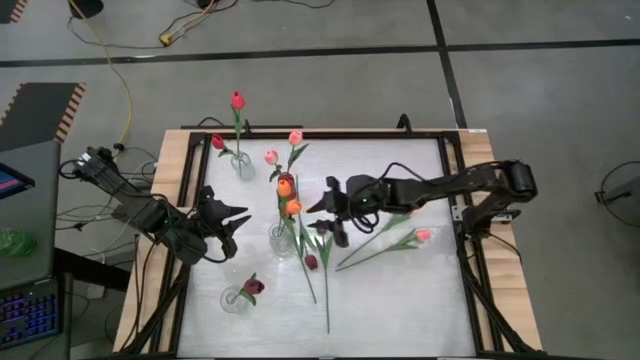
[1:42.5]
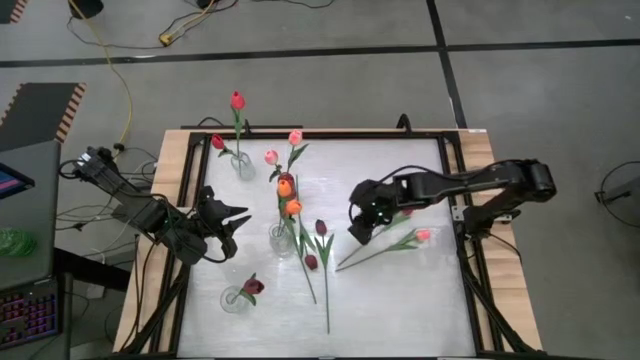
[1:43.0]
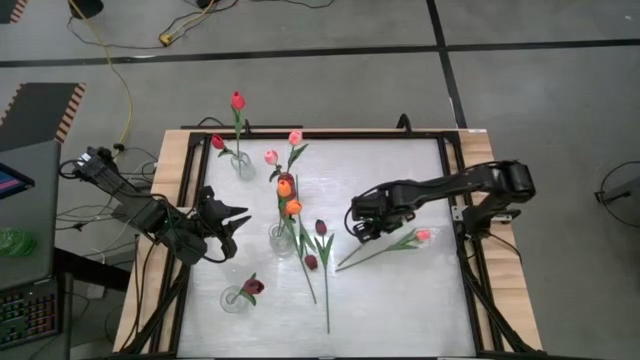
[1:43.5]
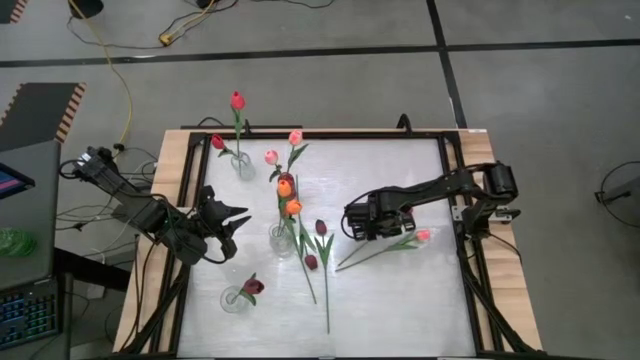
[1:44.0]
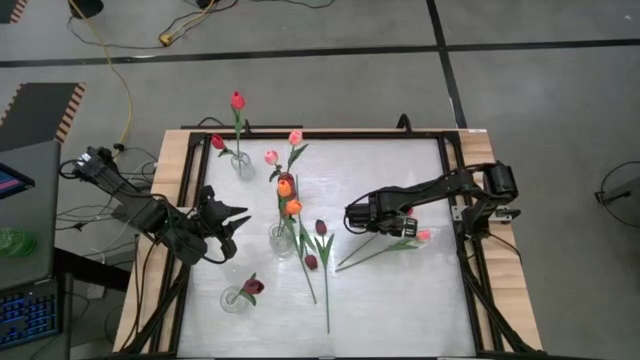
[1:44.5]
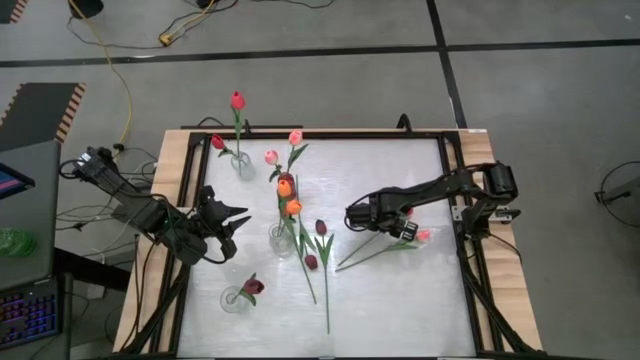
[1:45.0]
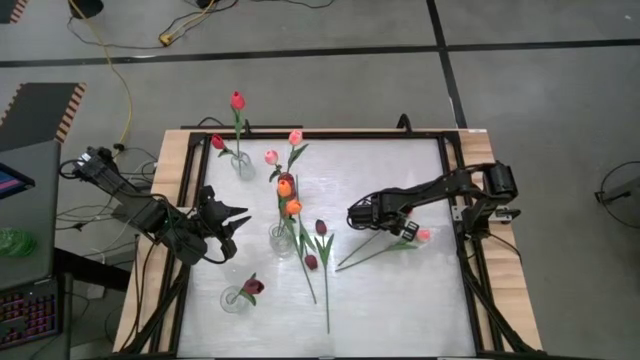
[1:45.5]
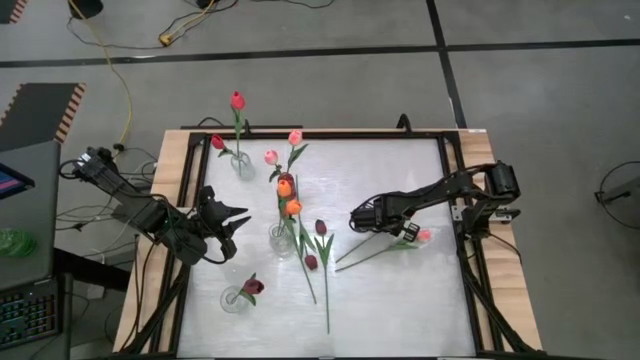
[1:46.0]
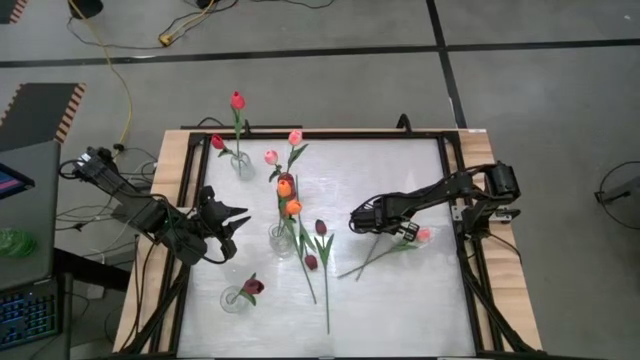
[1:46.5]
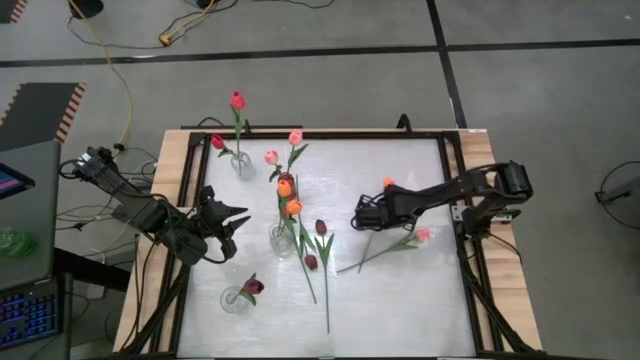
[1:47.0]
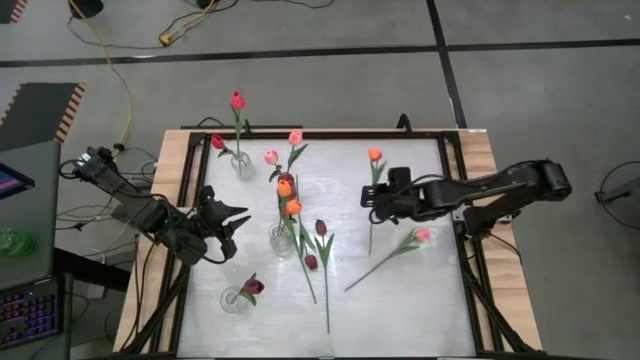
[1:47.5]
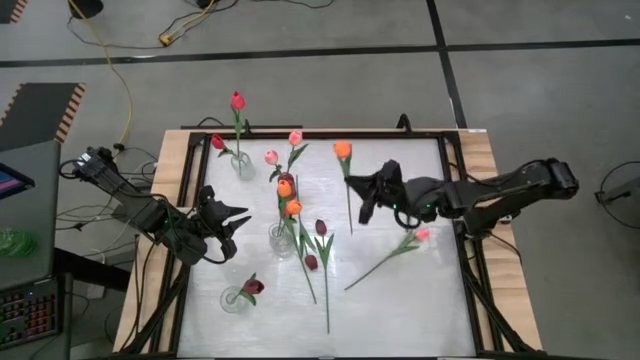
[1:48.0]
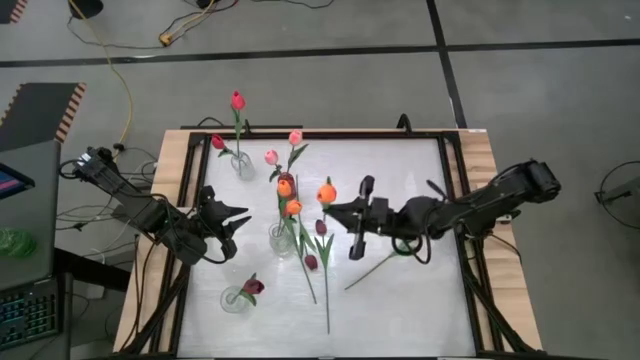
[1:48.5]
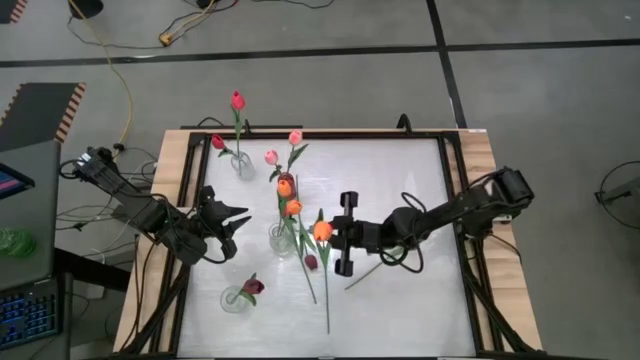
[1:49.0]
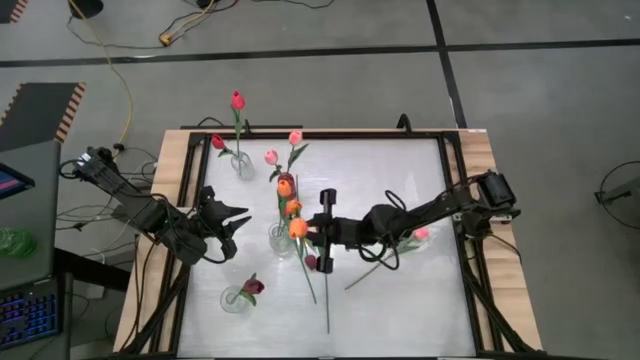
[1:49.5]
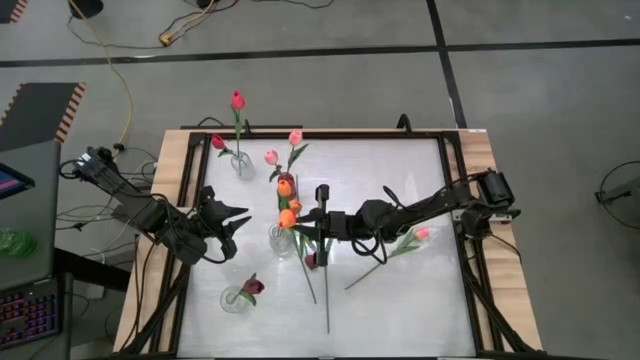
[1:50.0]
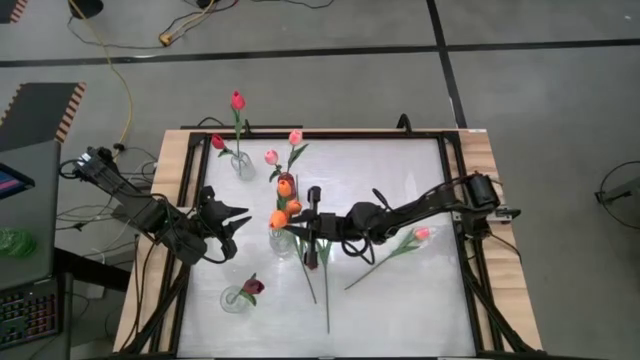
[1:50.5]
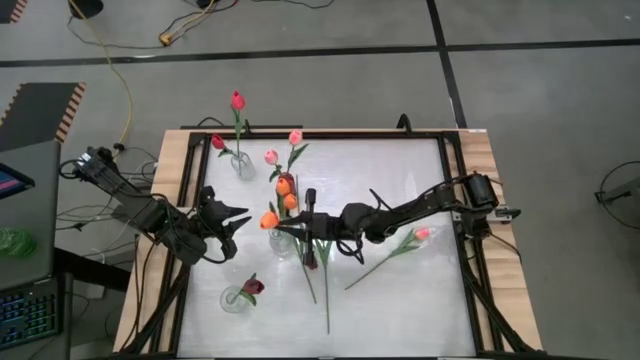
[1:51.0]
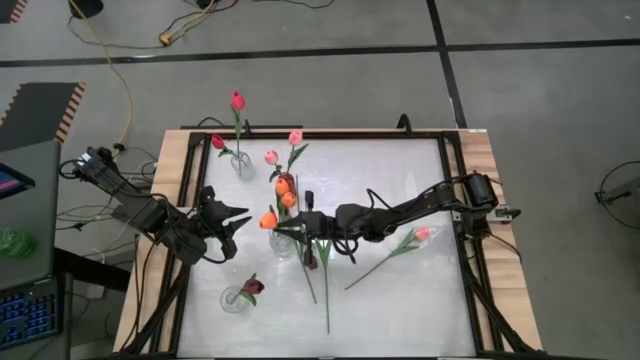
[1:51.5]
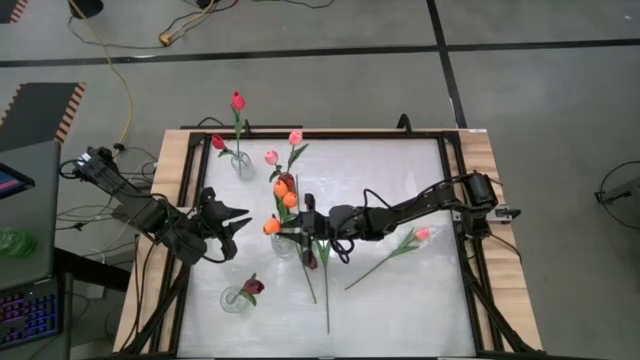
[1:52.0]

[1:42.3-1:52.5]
Task: Sort flowers into vase by color
Put the orange tulip into the middle transparent vase

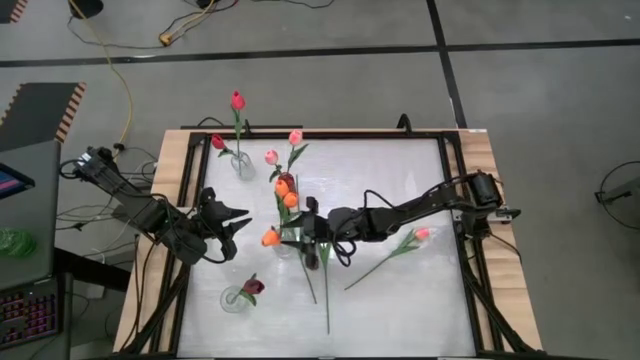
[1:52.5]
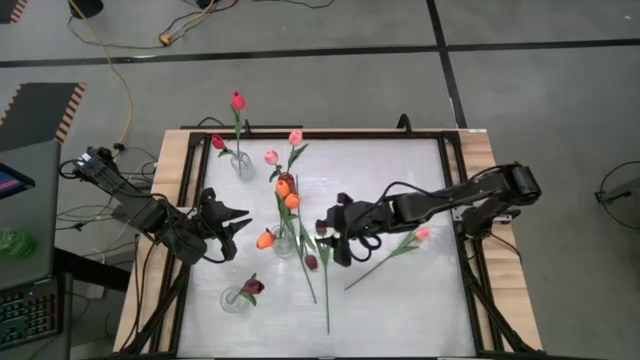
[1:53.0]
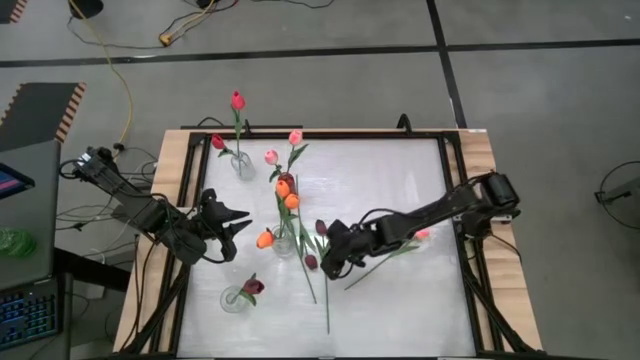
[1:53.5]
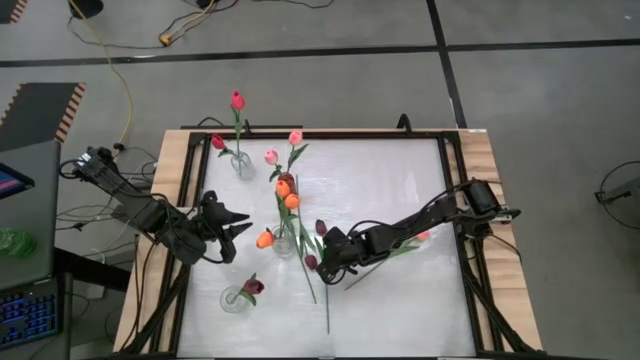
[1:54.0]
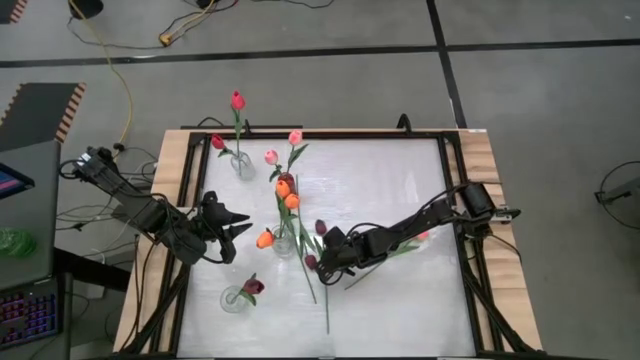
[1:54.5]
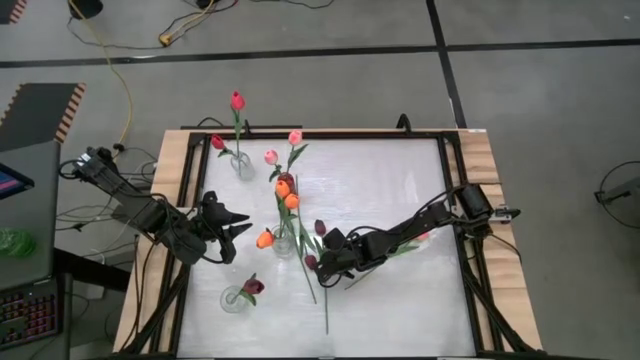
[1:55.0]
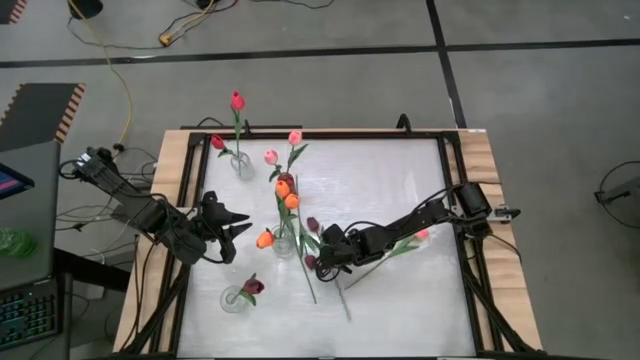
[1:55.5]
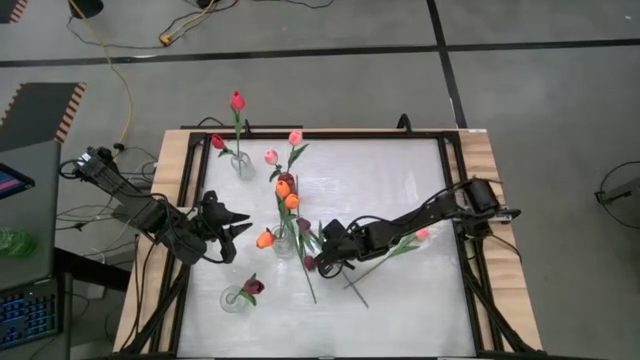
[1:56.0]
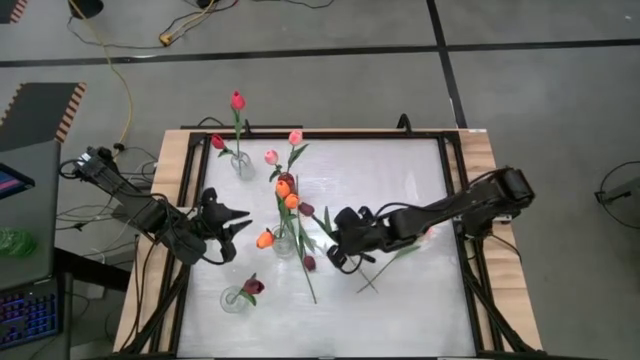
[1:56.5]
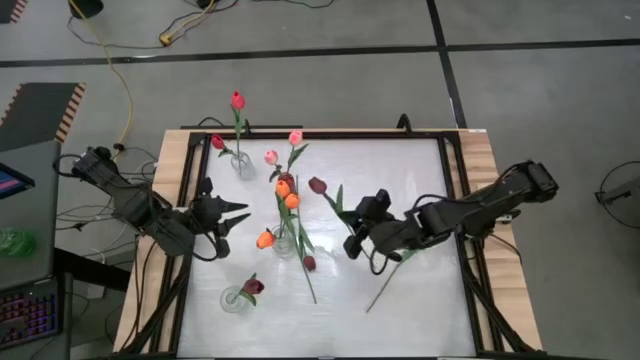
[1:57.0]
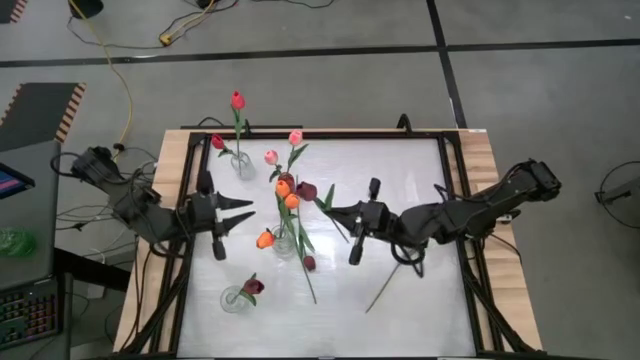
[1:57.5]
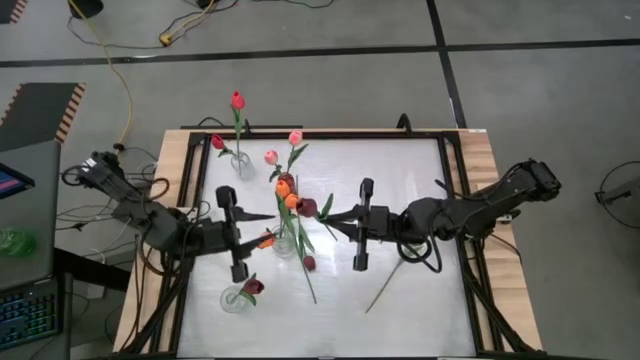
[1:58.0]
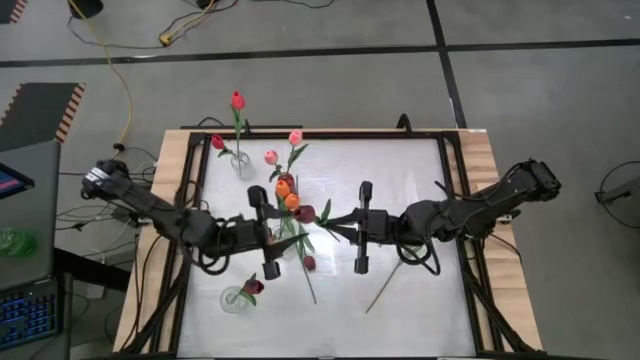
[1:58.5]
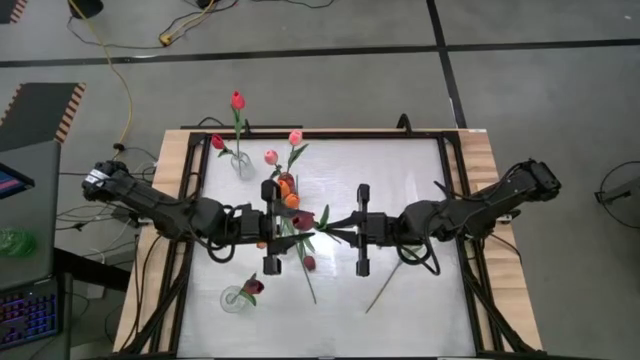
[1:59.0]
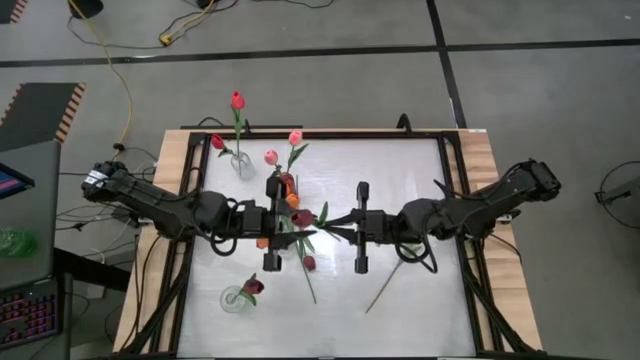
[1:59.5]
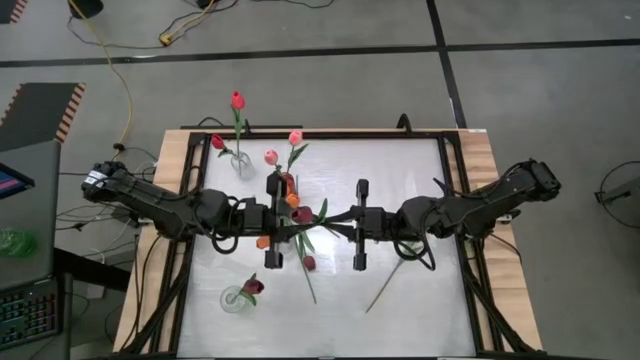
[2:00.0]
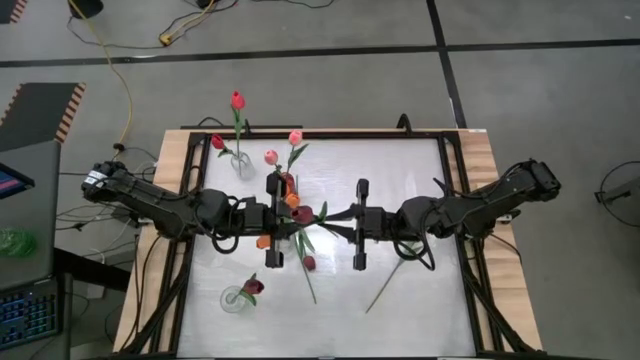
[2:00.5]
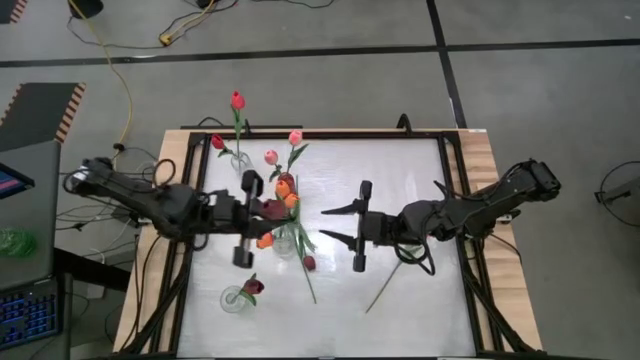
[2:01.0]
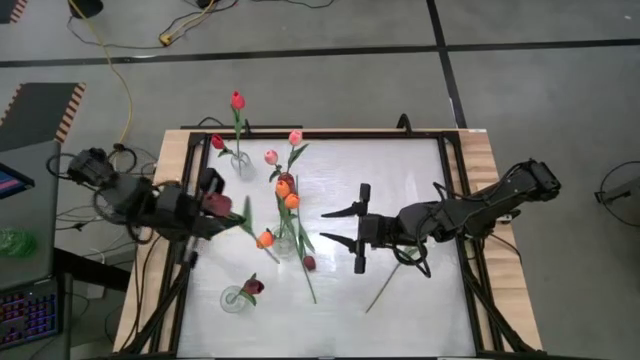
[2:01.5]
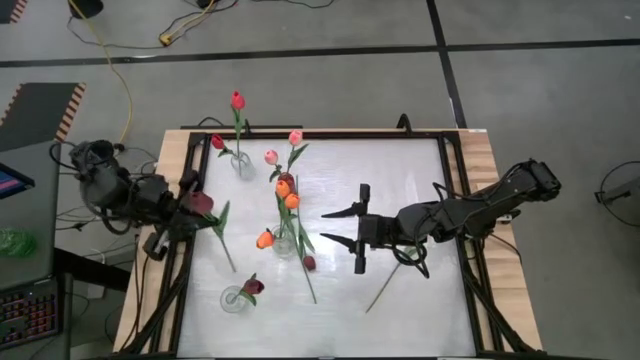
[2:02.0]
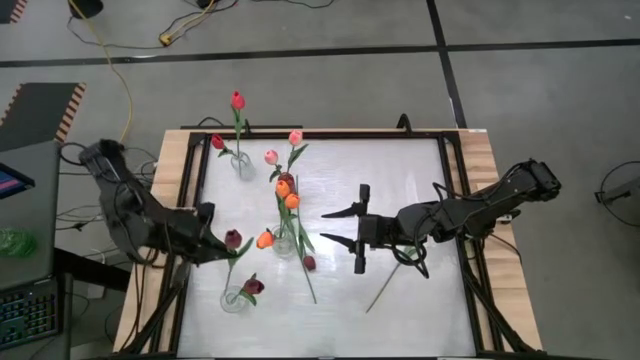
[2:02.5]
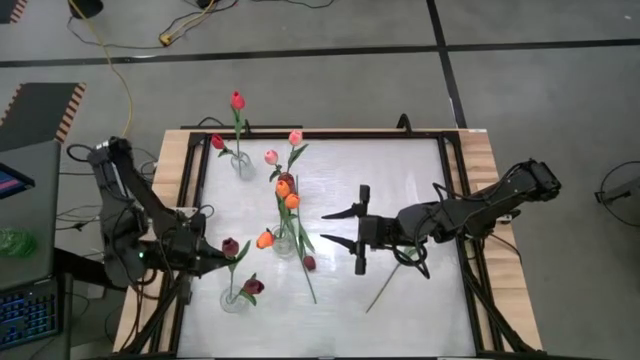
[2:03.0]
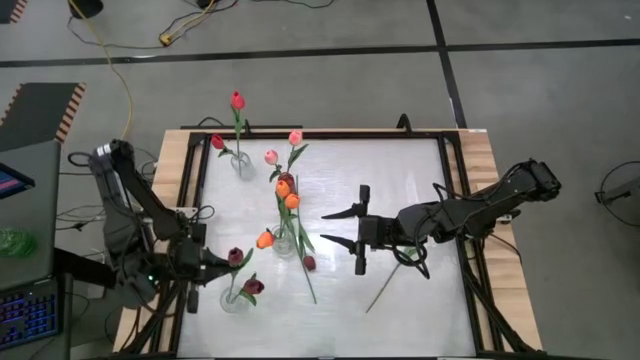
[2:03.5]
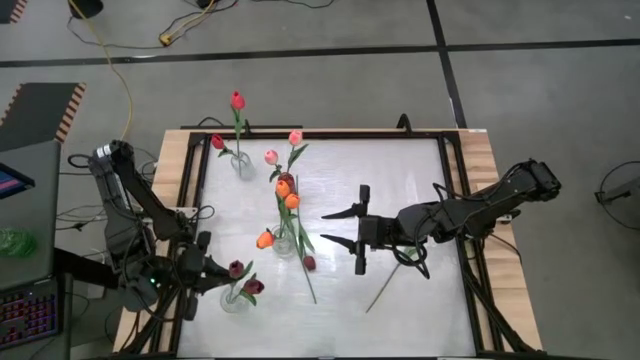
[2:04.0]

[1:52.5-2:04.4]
Put the dark red tulip into the bottom transparent vase
